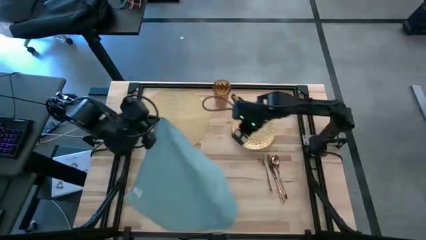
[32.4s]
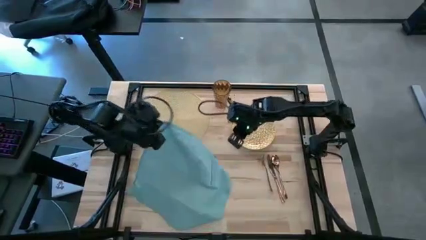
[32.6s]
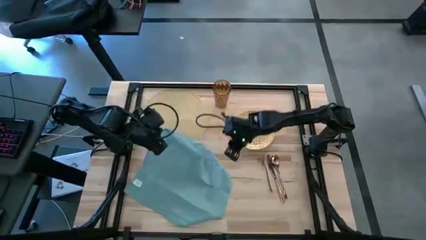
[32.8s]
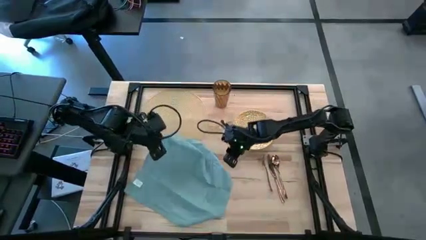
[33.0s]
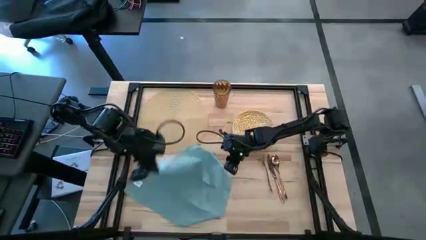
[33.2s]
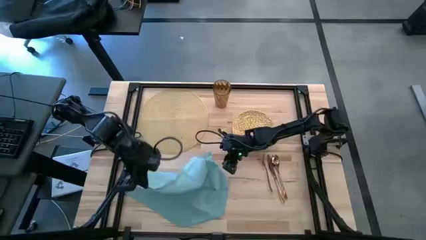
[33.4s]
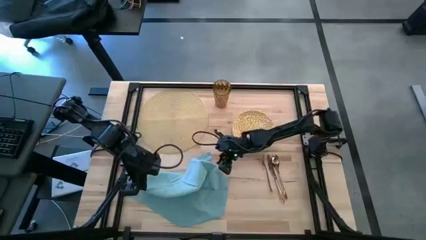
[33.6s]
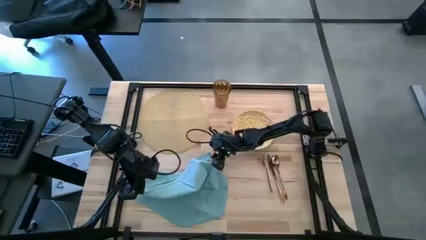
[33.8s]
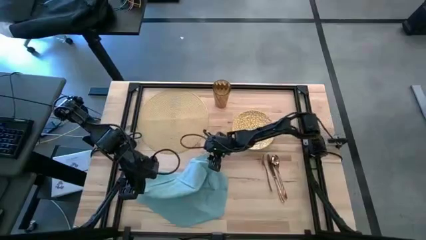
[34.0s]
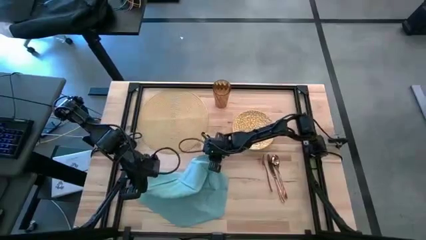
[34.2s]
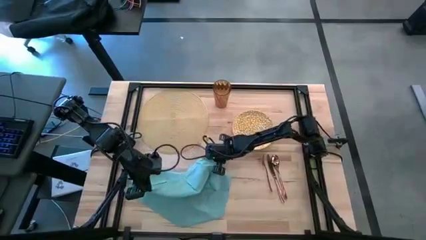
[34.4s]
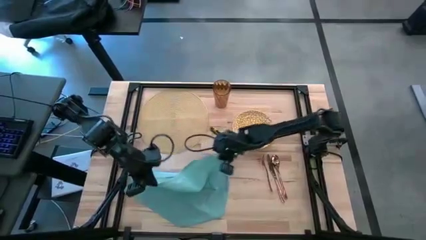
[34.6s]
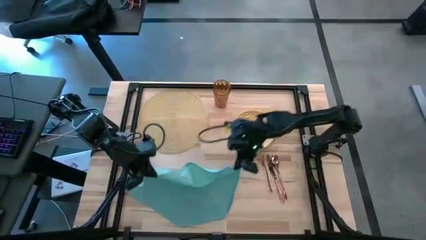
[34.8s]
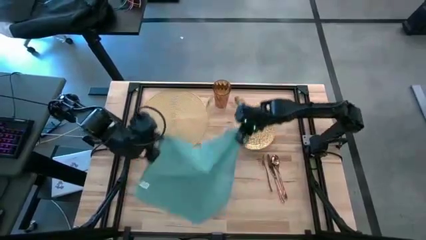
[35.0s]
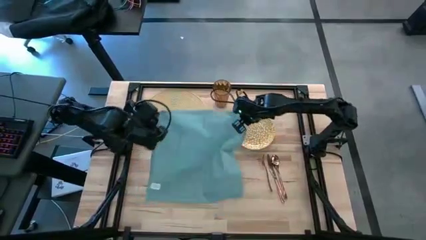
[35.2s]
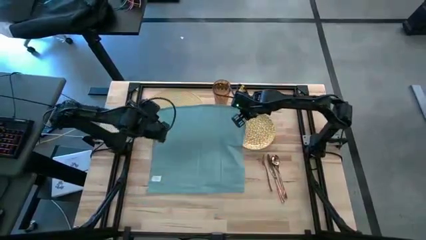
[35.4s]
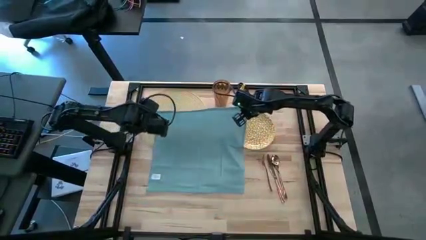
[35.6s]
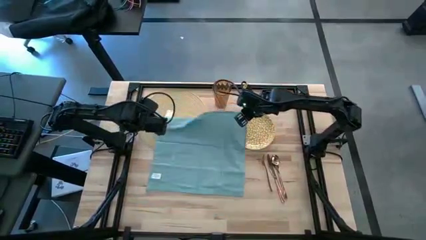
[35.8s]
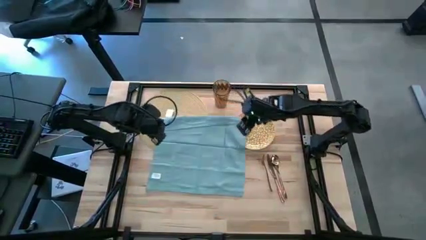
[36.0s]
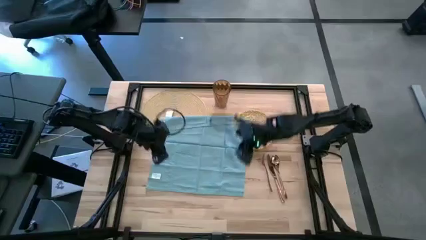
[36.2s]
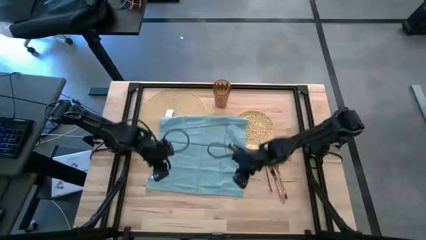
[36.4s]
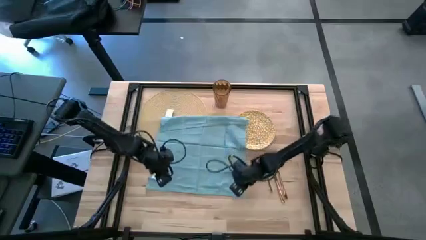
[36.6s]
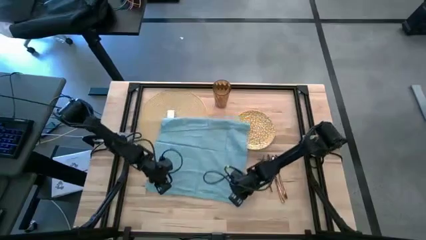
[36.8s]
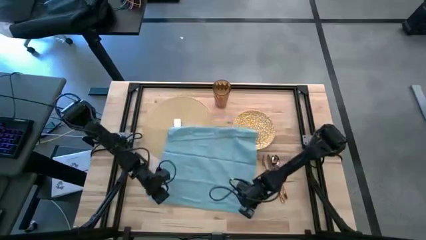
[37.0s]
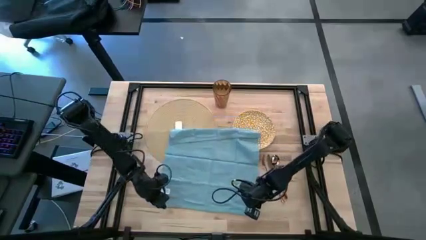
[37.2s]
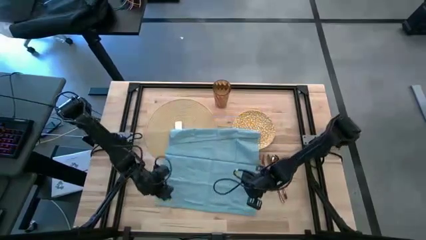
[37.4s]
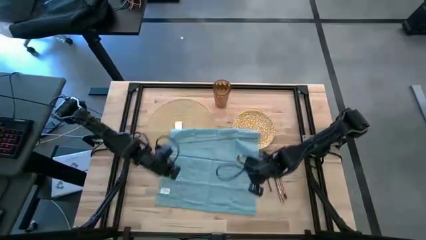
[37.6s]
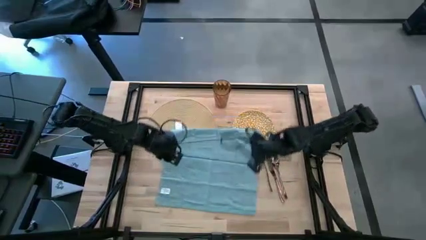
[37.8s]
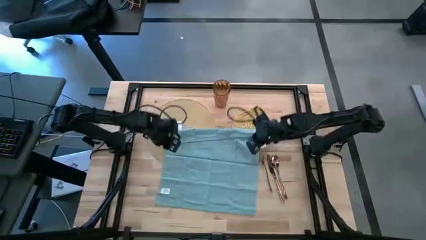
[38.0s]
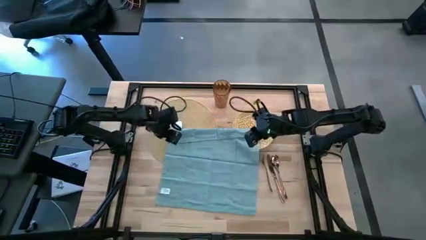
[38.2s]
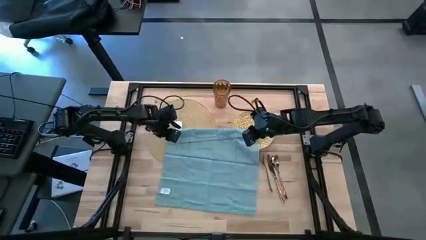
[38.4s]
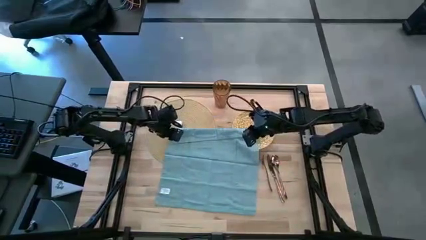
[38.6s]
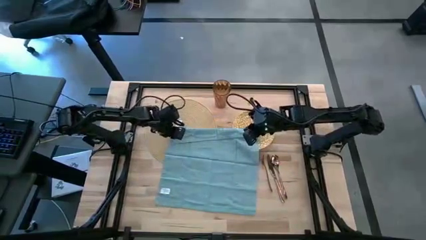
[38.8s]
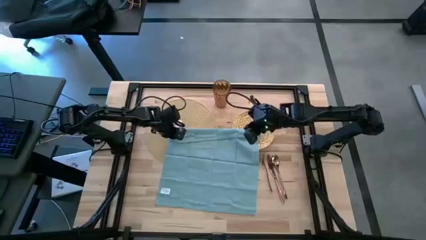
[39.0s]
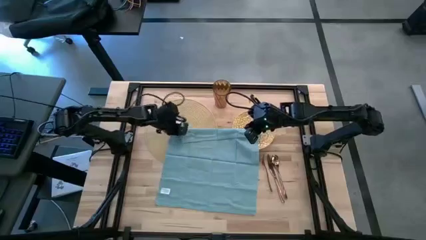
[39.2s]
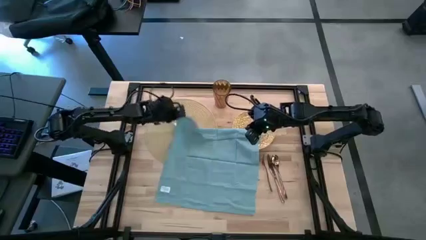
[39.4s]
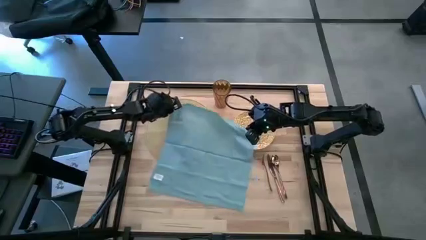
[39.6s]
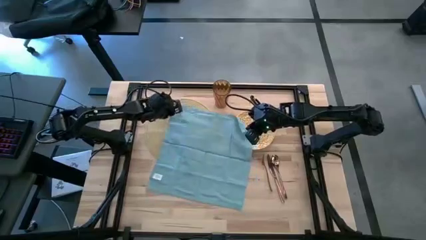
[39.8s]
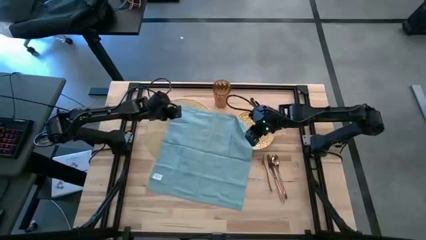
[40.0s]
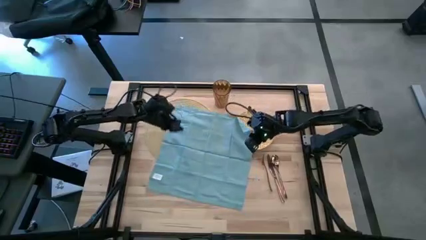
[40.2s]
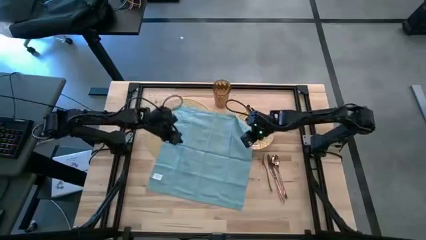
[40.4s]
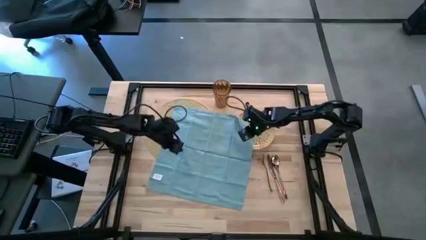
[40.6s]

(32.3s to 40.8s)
Task: Set table place
Fold the blue table napkin

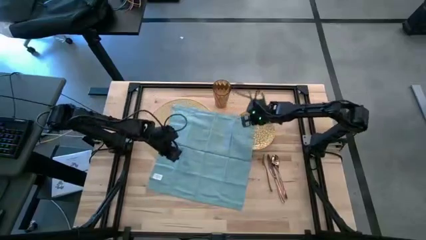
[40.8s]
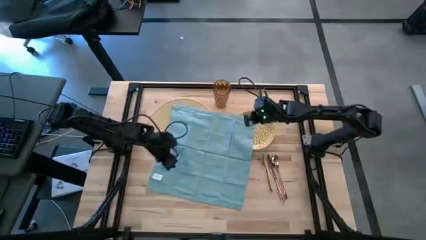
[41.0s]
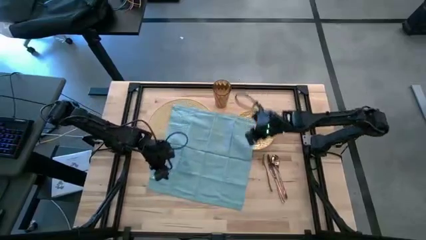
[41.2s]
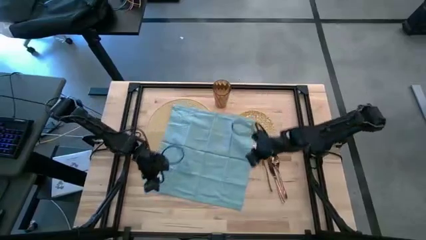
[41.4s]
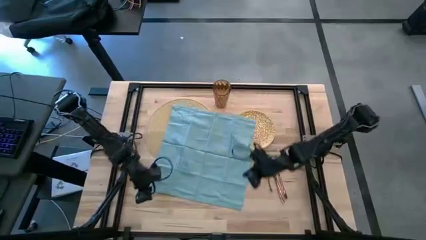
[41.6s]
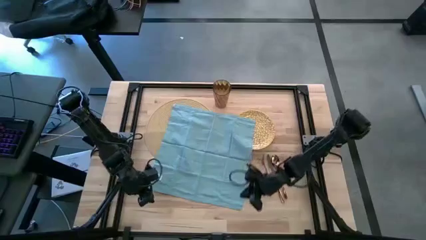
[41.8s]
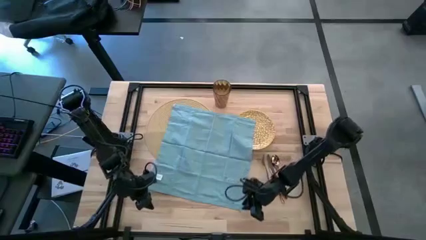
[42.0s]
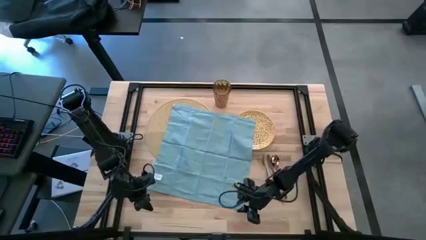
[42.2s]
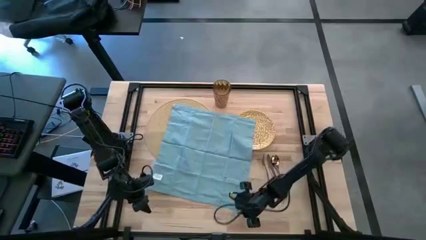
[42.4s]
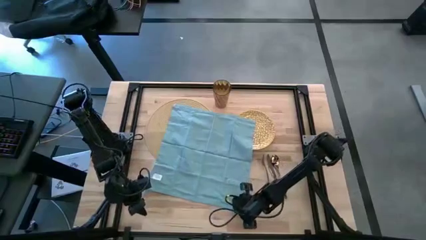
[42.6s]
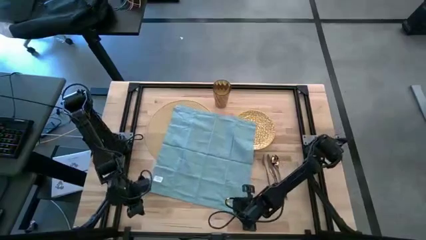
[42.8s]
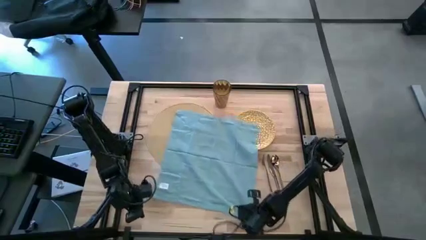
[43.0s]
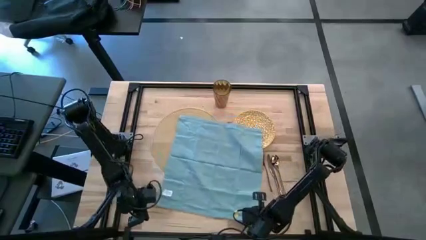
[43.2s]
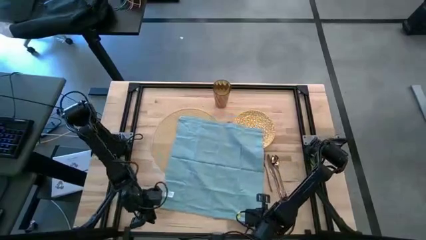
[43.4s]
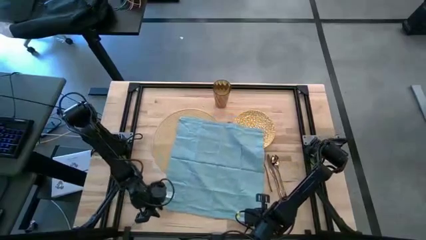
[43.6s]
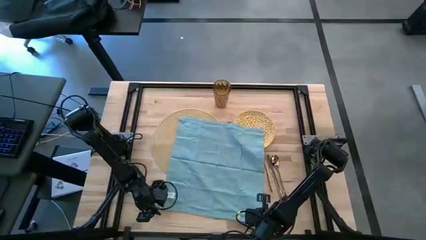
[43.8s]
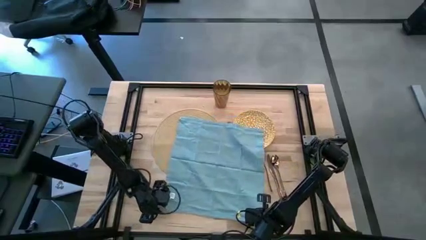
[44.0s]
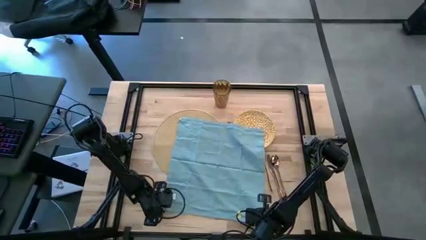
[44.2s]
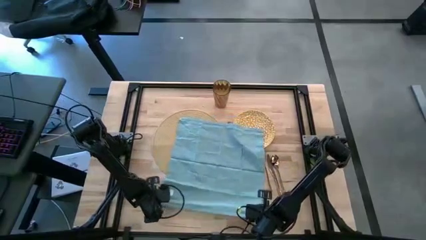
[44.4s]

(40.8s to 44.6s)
Fold the blue table napkin
